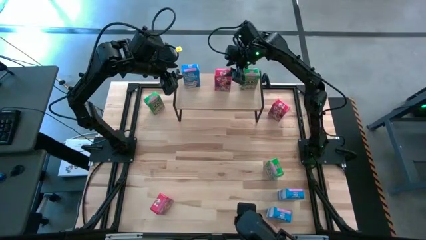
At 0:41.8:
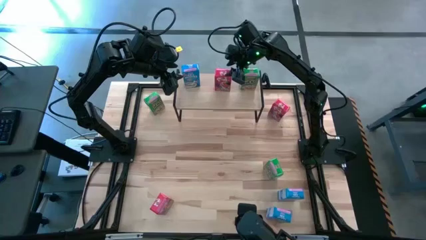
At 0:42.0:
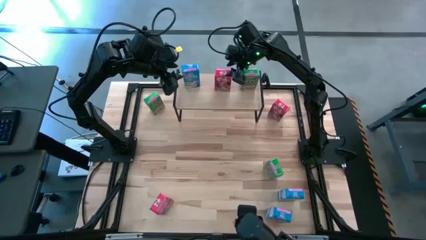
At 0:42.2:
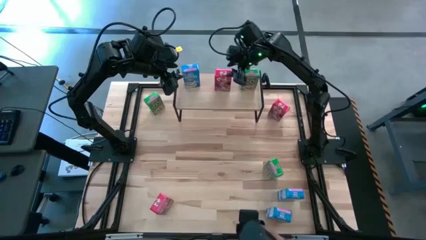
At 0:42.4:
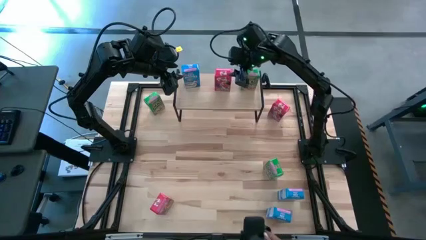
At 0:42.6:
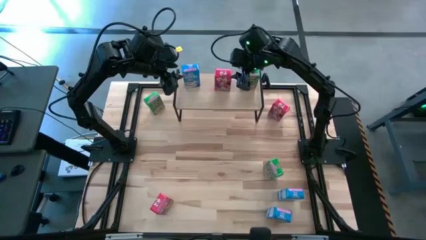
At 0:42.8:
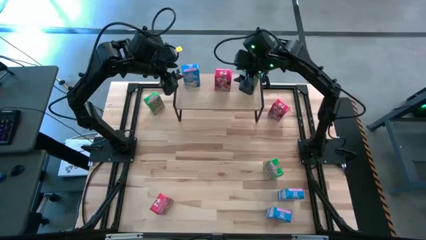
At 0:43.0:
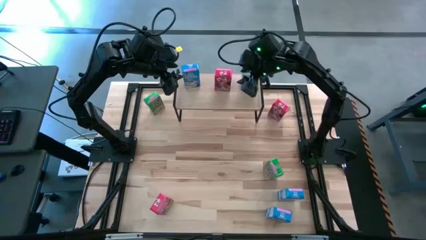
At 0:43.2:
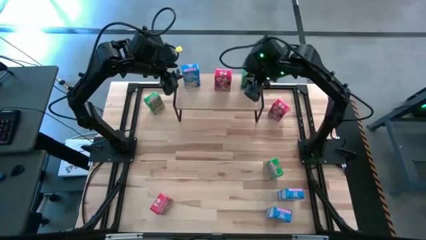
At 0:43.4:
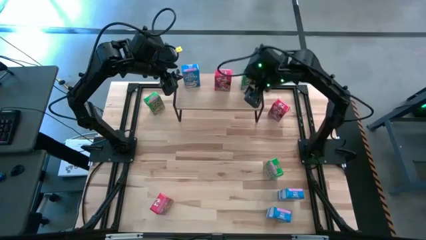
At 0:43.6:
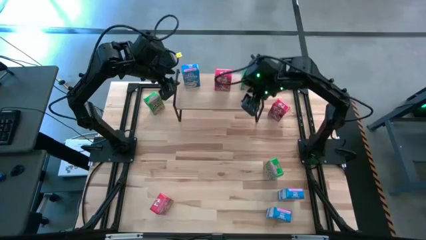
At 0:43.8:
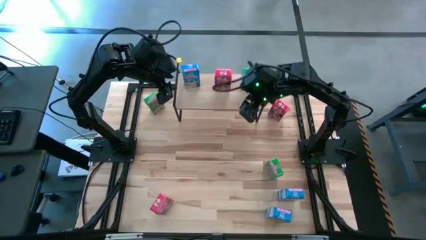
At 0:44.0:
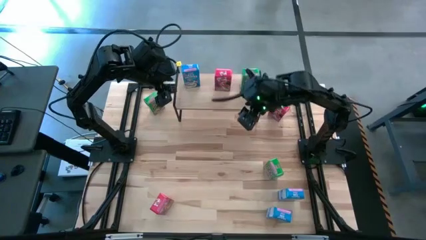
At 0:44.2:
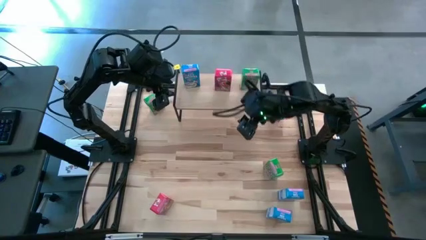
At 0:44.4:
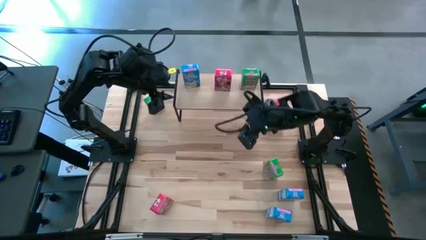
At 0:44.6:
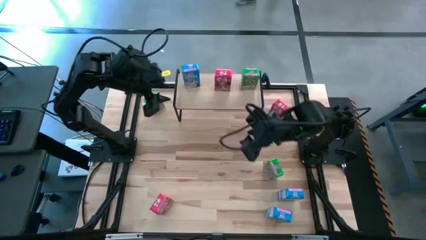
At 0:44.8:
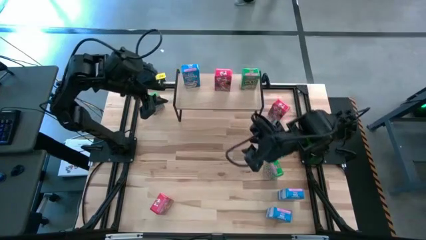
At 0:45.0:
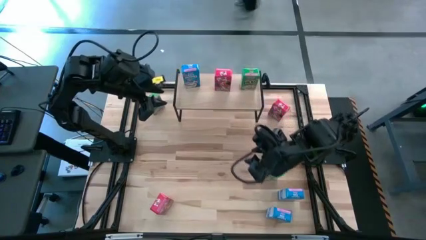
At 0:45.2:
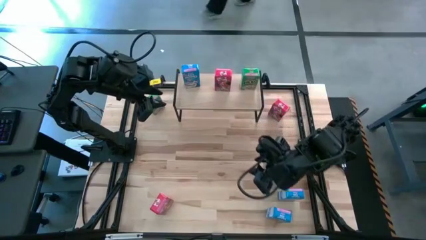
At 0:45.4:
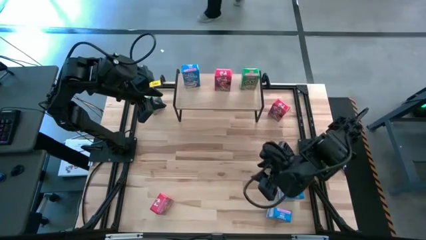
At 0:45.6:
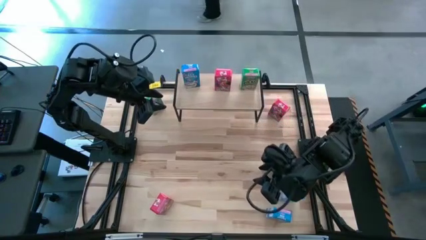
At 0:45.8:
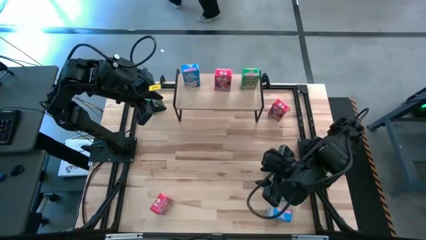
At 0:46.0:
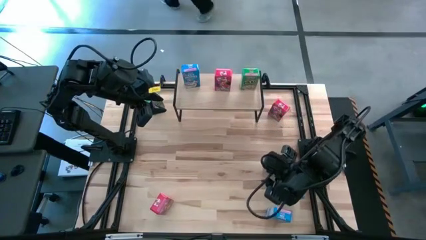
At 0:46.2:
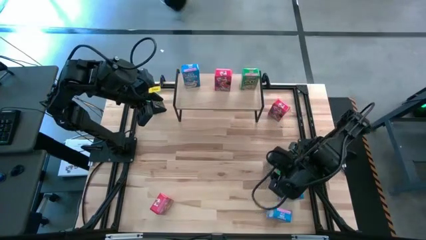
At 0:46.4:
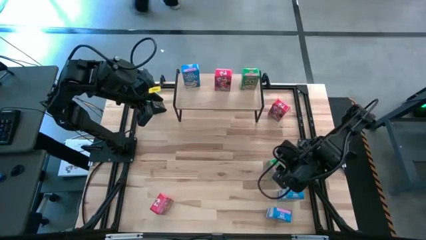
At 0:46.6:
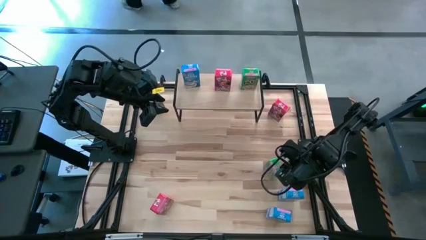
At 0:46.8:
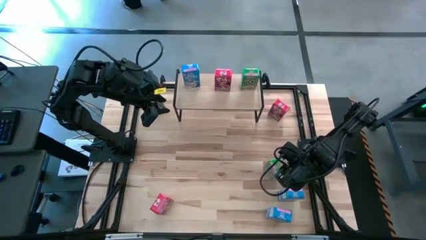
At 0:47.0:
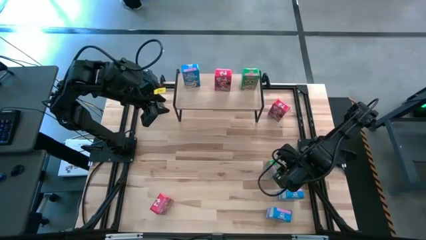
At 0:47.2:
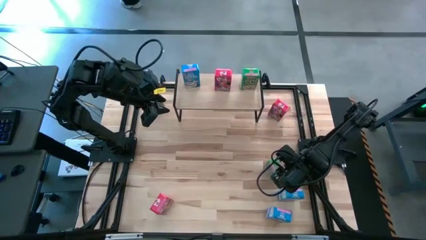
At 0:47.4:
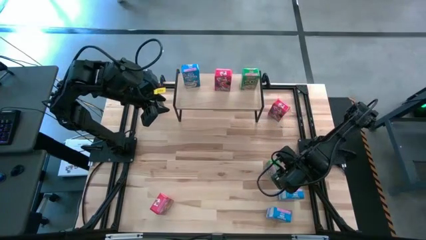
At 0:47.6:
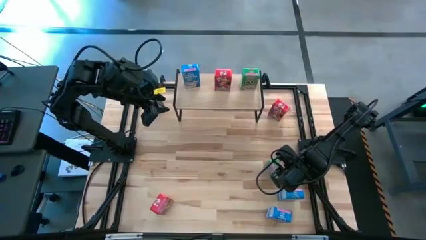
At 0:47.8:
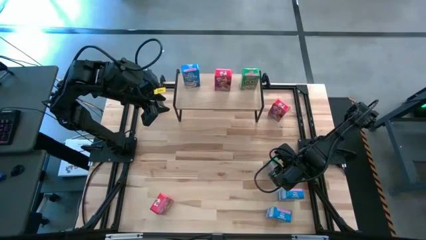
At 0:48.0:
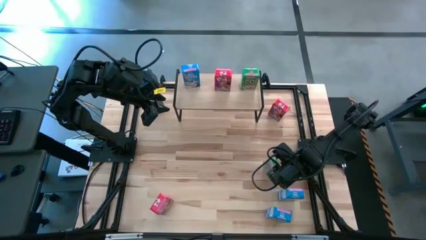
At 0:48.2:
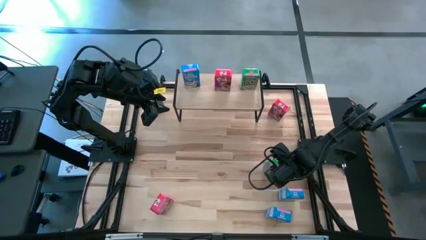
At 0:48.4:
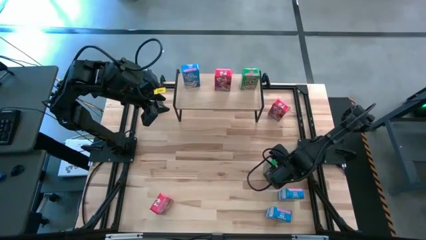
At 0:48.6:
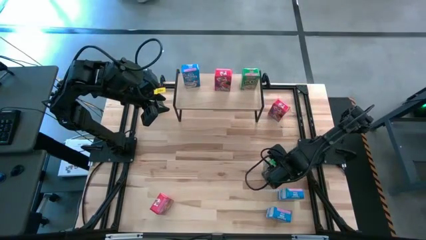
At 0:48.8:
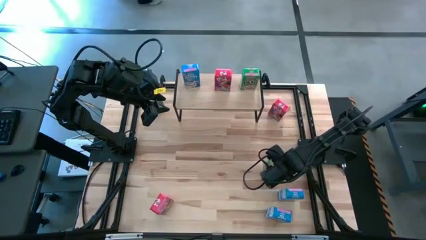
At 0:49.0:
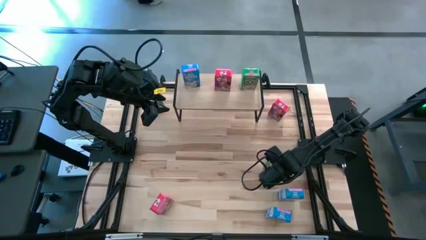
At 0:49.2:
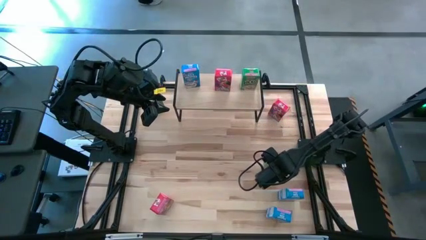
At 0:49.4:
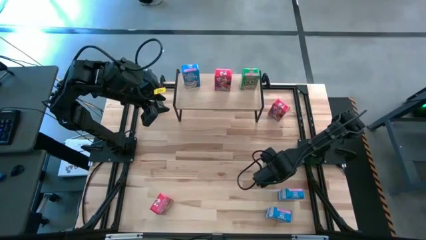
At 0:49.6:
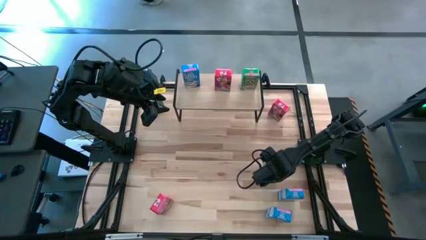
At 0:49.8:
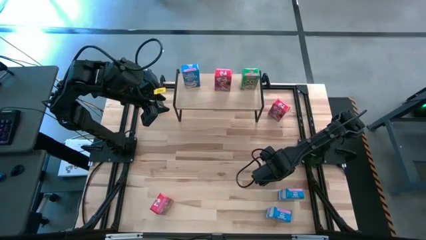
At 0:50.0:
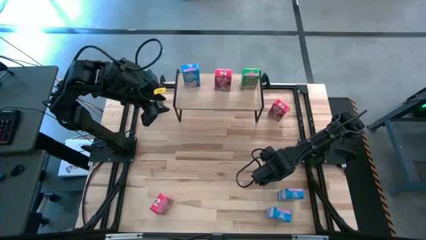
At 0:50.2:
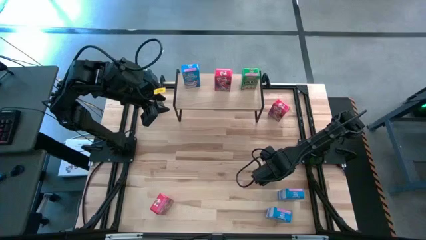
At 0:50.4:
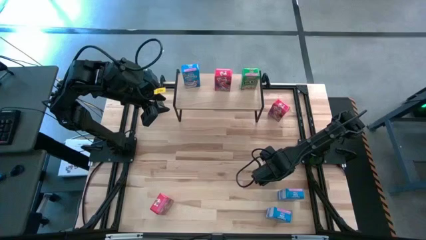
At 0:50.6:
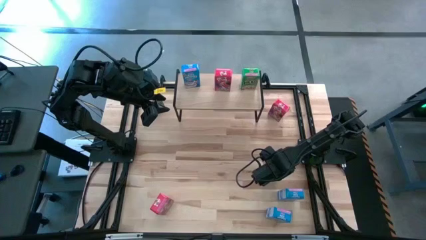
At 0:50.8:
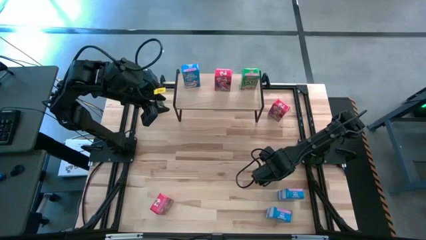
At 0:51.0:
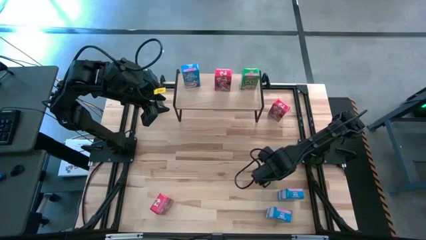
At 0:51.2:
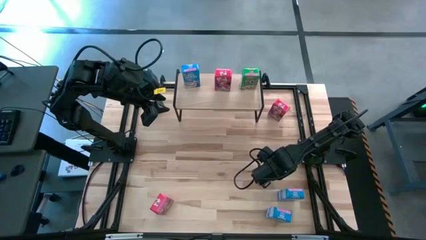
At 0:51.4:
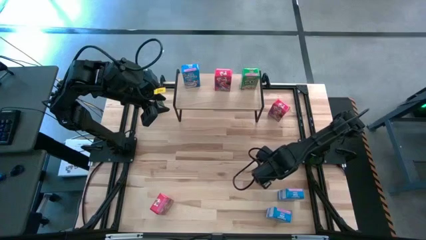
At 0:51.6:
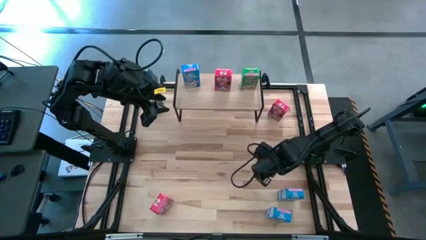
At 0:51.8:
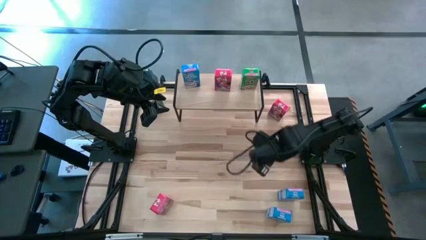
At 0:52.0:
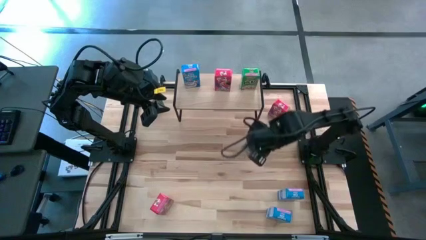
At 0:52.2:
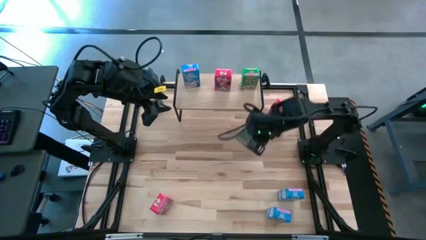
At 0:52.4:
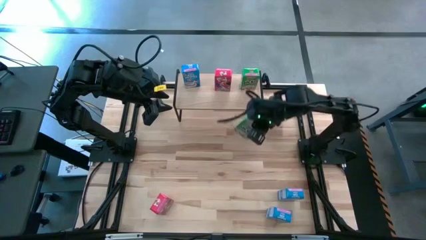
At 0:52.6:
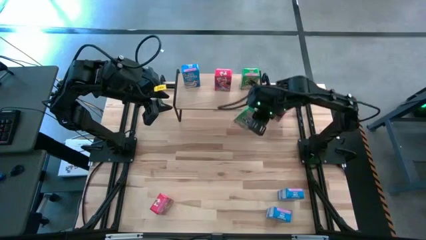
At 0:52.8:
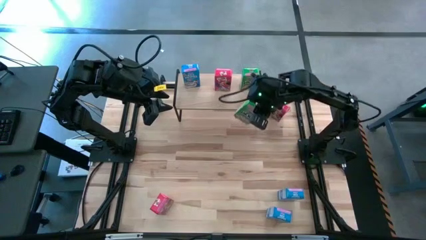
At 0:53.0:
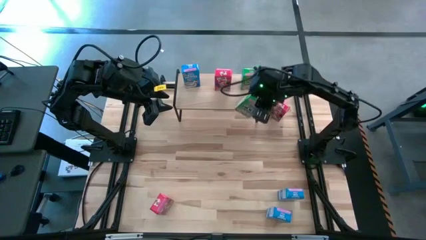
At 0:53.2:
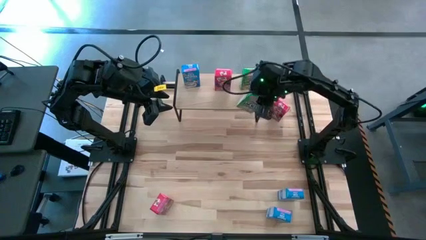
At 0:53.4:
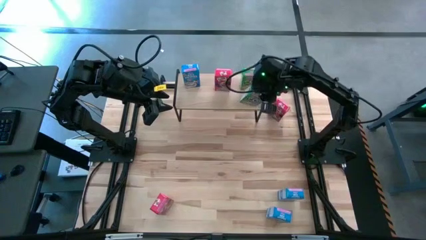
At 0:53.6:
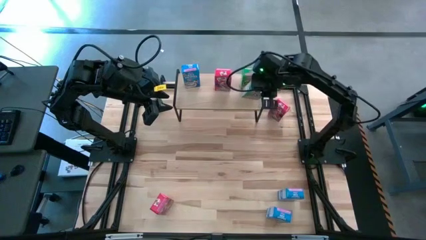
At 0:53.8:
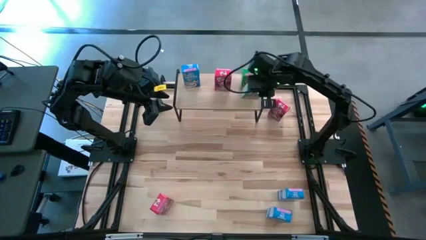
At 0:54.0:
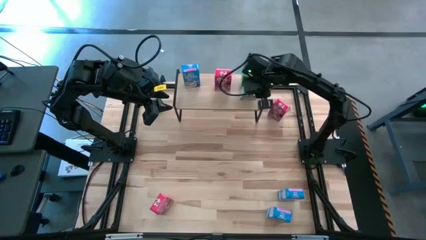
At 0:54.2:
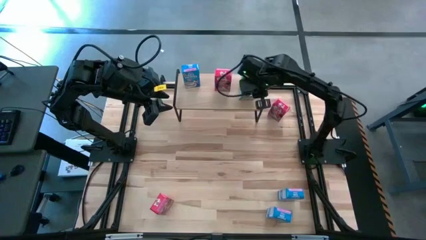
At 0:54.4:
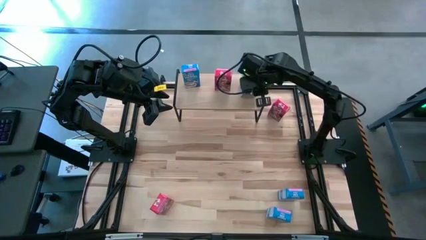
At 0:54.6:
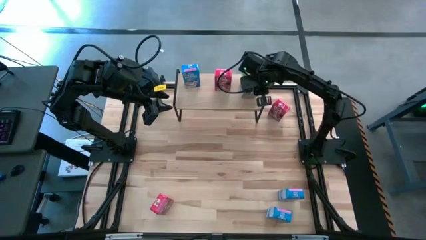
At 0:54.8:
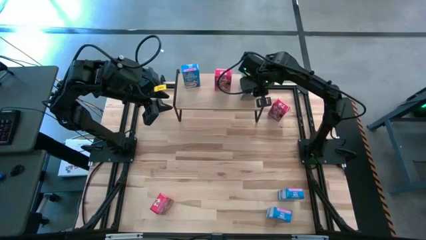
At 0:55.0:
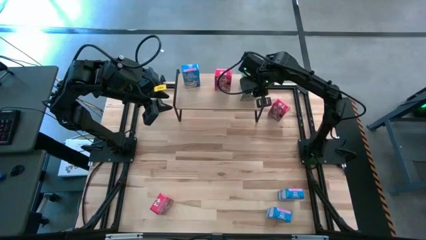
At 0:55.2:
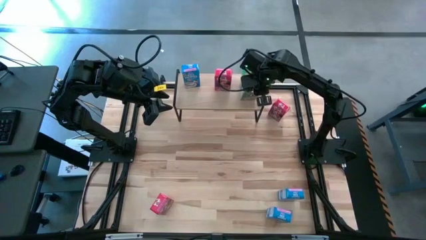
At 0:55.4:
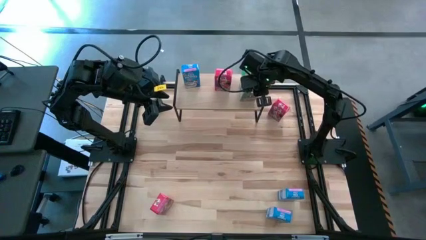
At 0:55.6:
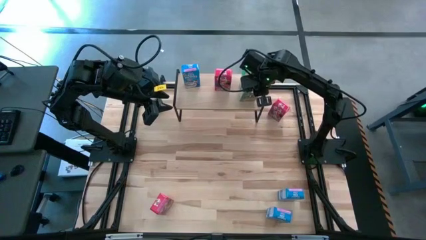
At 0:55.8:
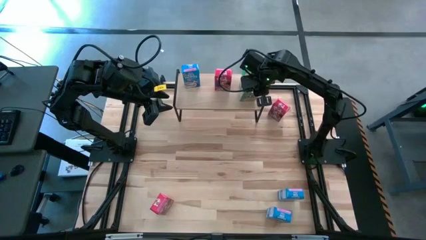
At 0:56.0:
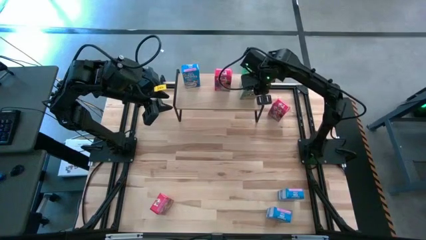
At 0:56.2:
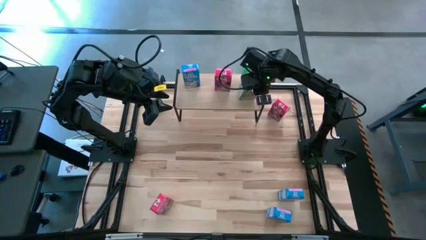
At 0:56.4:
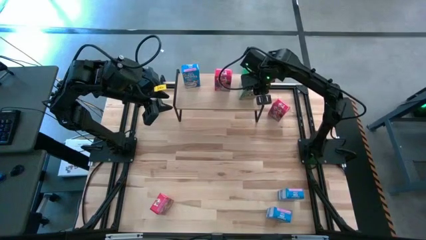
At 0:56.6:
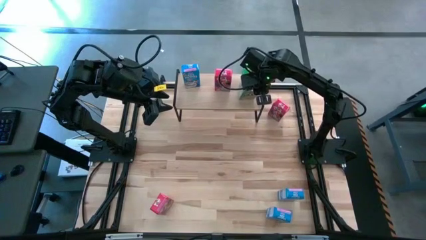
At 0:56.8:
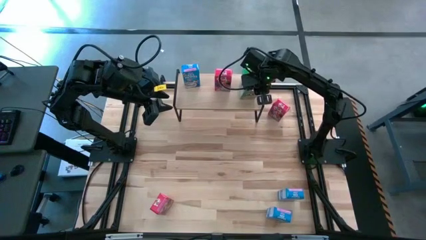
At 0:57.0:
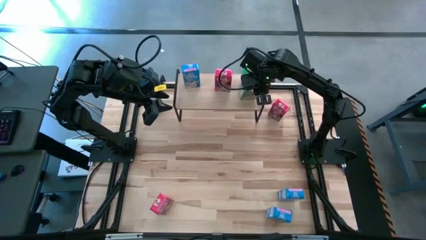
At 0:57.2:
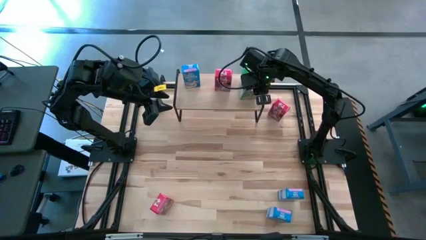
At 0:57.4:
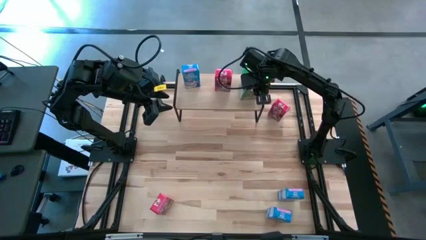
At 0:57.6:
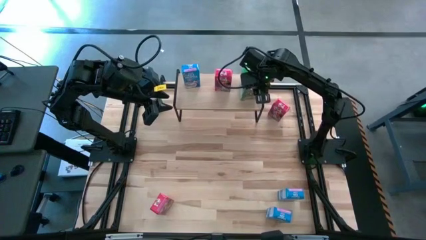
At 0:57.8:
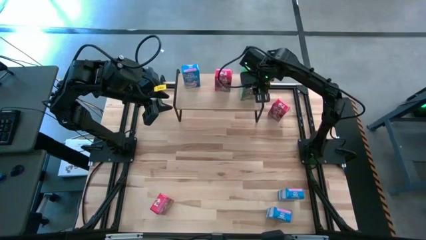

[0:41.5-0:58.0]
Task: Stack cereal on shelf
Put the bottom green cereal box on the shelf aligned with the other green cereal box
